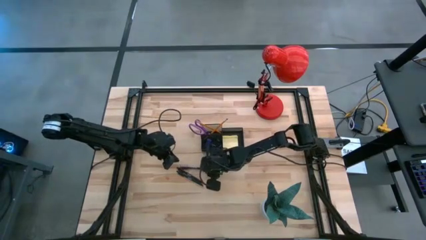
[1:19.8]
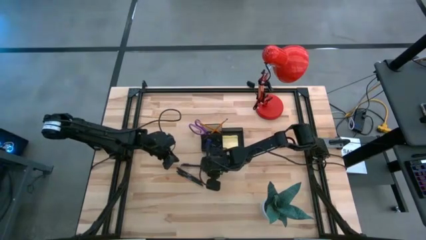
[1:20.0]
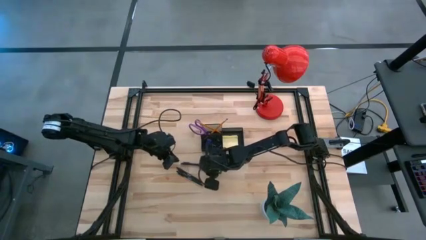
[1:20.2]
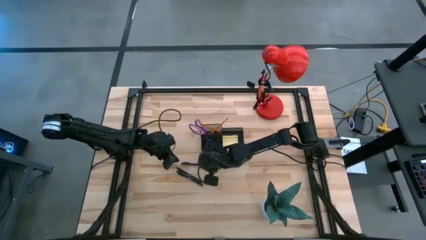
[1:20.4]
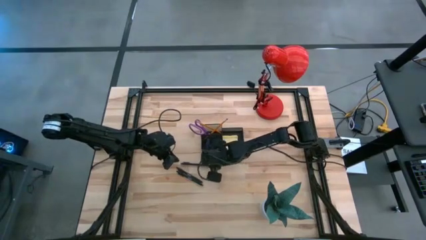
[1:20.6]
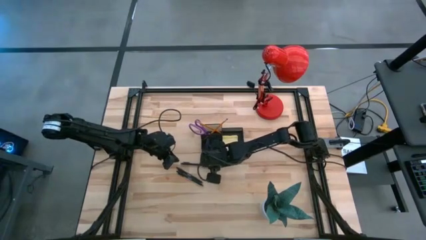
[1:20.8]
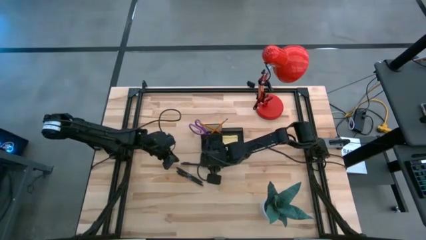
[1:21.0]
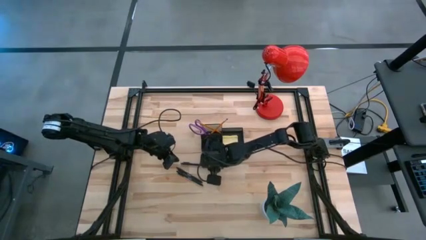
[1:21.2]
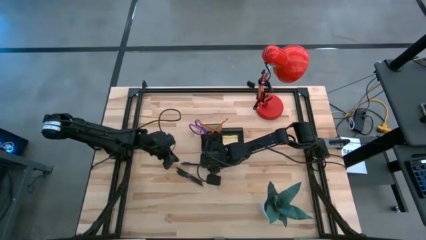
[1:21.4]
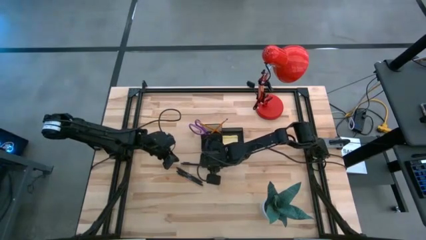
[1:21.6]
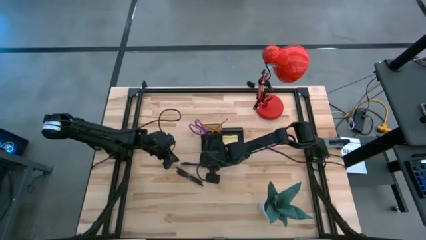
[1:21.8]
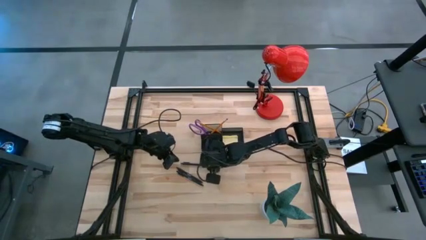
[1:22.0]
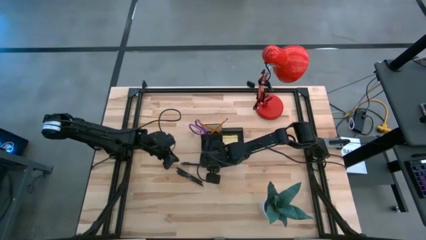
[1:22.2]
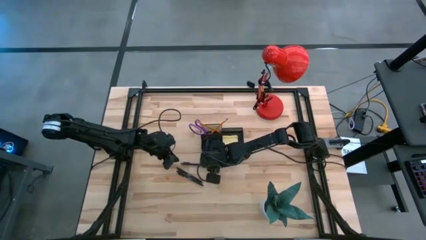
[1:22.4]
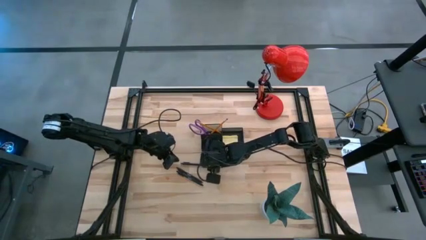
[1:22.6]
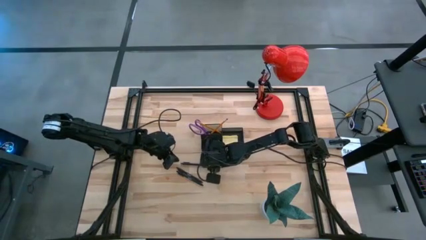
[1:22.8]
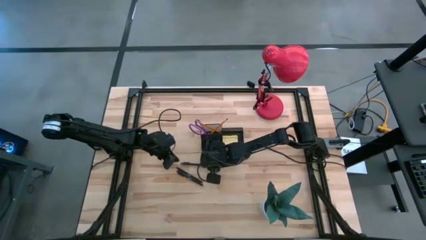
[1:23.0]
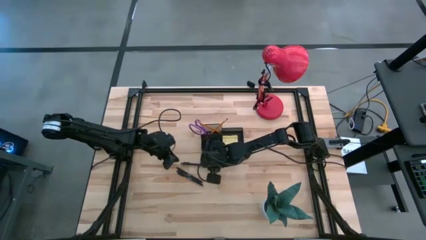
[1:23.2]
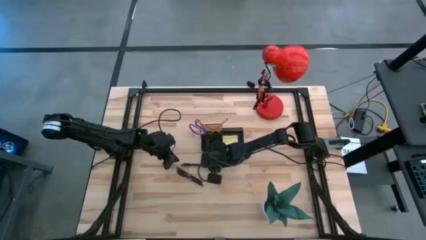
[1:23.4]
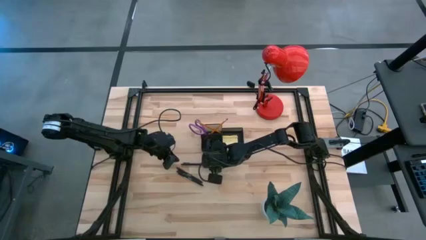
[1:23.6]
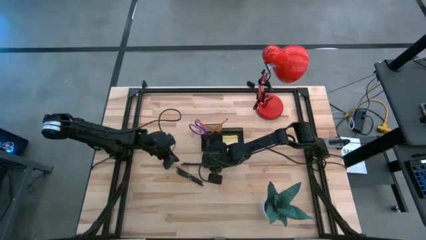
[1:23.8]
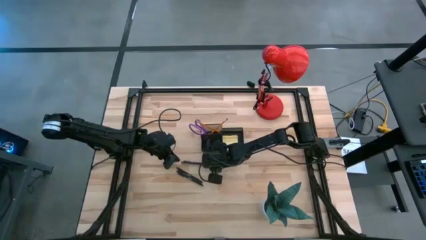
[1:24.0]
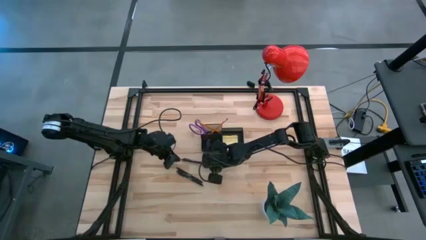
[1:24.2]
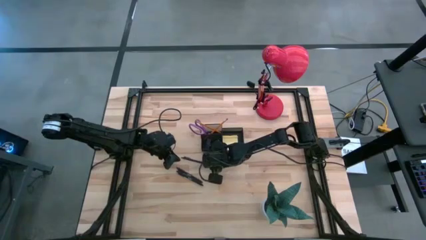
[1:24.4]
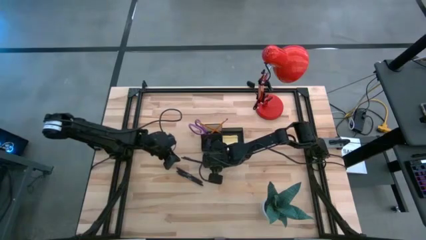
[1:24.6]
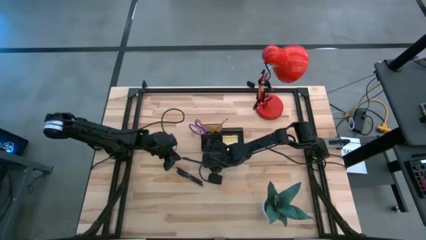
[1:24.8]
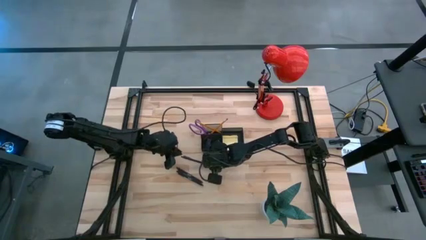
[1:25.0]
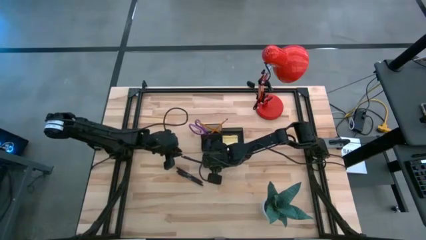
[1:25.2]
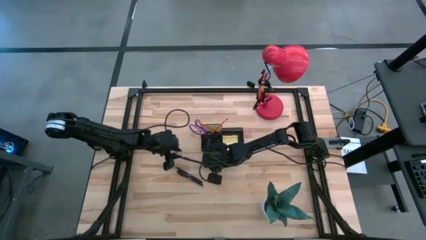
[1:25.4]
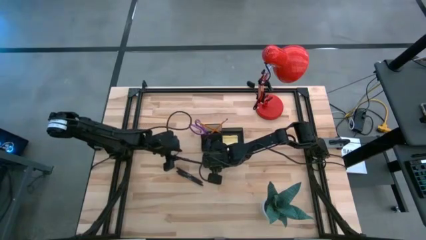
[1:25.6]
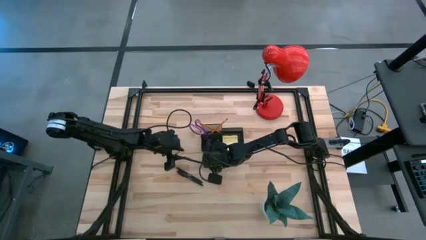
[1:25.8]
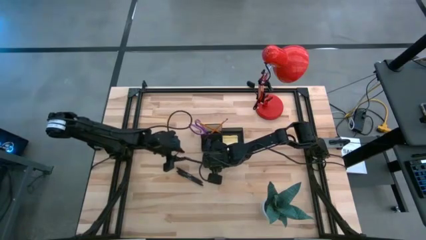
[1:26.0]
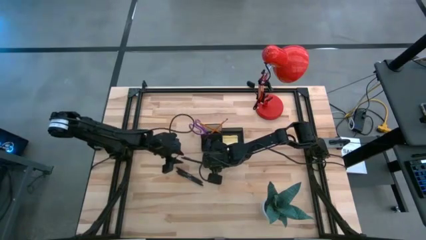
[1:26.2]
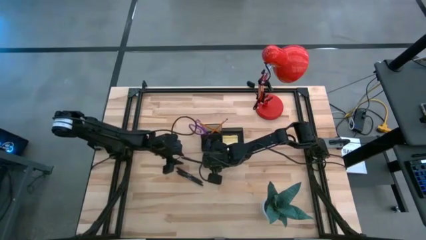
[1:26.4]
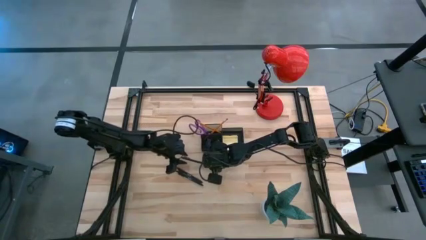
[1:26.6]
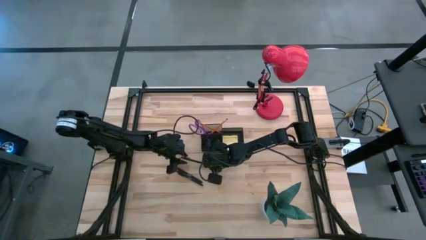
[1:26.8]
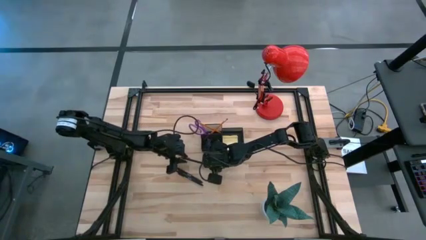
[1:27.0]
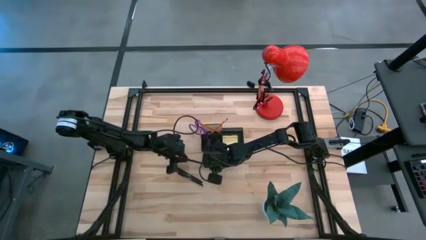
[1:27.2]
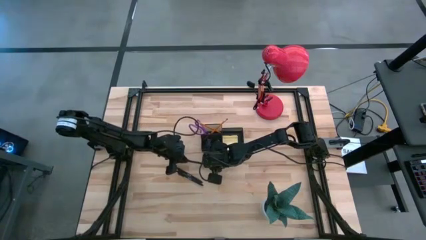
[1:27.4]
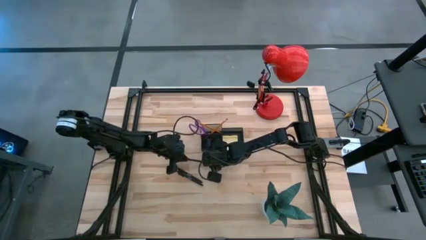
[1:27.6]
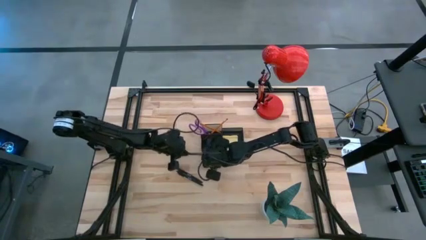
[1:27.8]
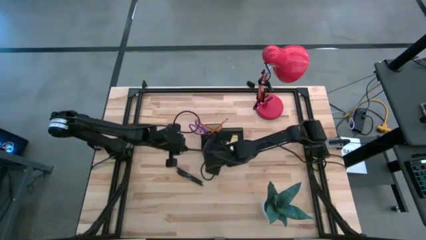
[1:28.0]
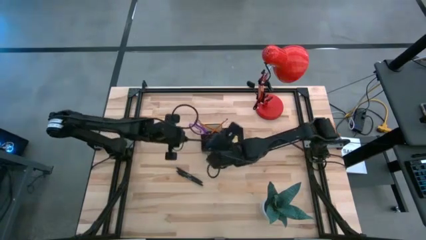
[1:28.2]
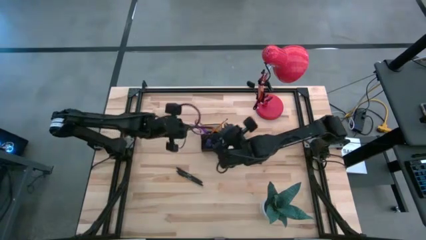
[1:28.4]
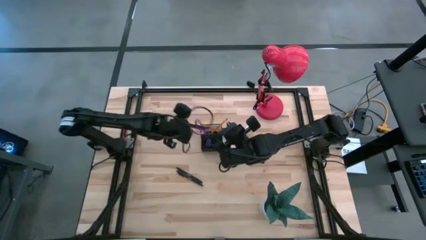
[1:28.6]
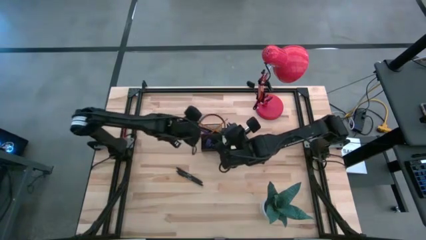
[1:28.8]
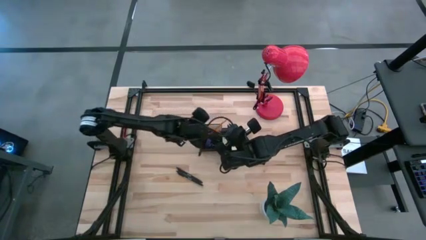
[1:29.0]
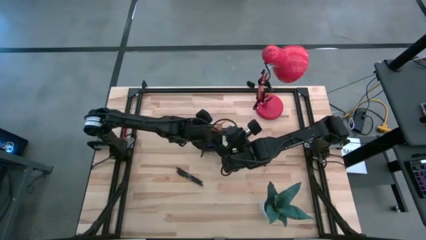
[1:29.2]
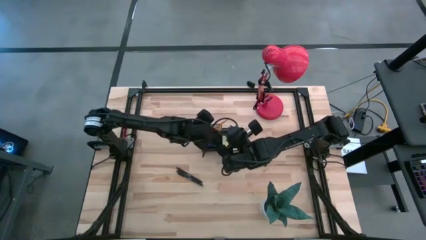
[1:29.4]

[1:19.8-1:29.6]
Task: Pick and place office supplies into organizer
Put the top black pen into the black desk organizer

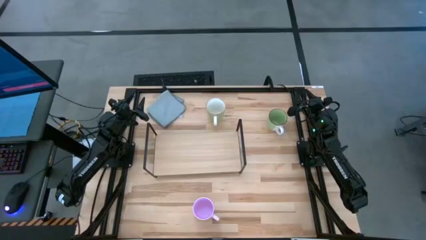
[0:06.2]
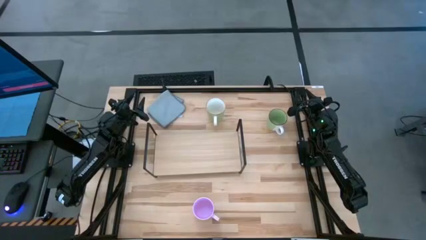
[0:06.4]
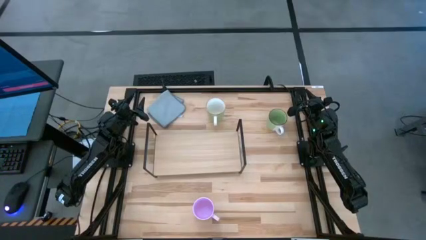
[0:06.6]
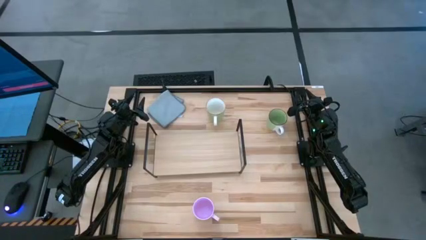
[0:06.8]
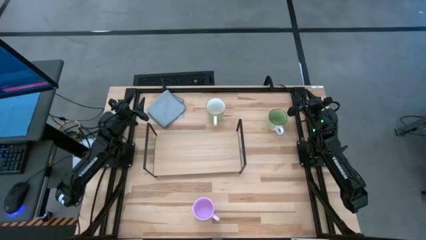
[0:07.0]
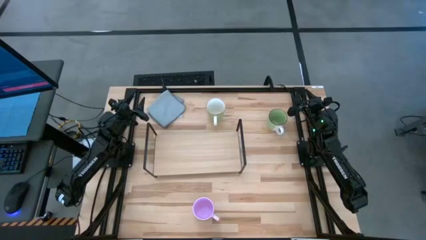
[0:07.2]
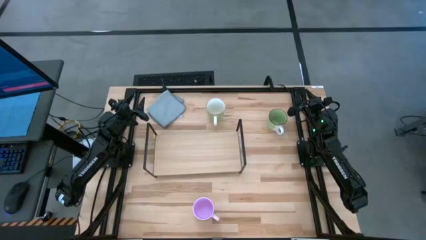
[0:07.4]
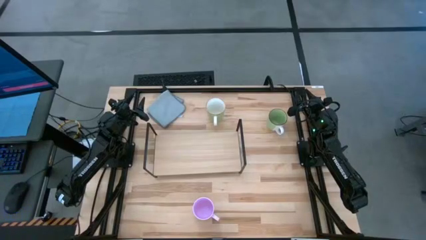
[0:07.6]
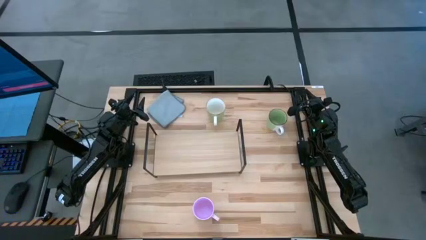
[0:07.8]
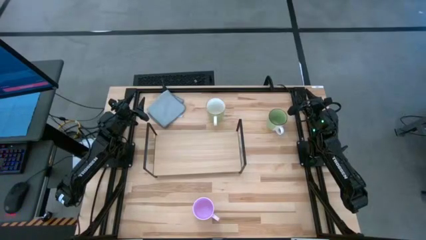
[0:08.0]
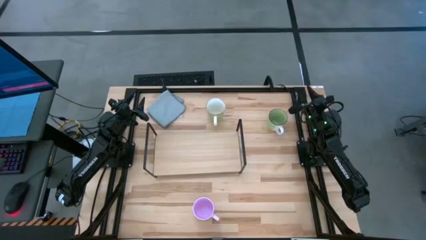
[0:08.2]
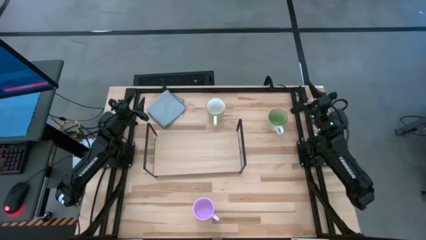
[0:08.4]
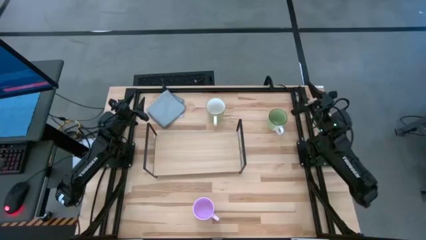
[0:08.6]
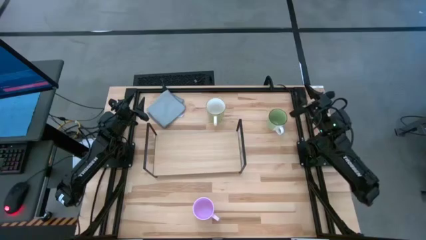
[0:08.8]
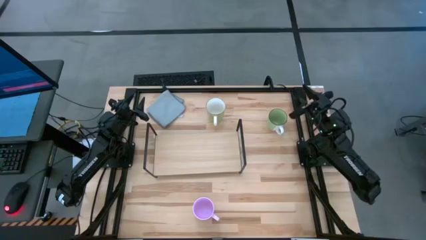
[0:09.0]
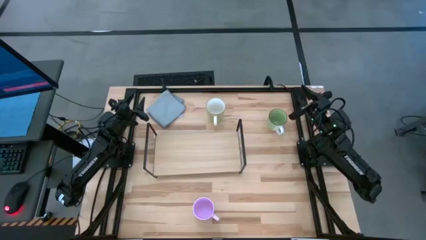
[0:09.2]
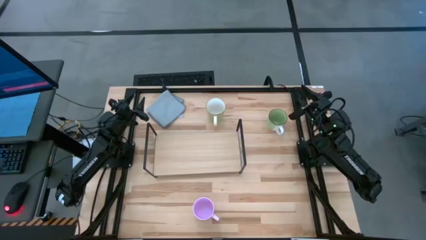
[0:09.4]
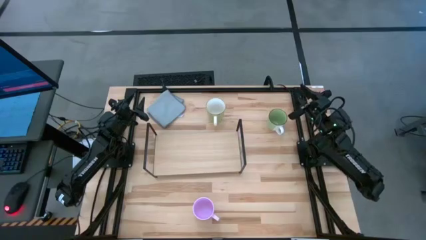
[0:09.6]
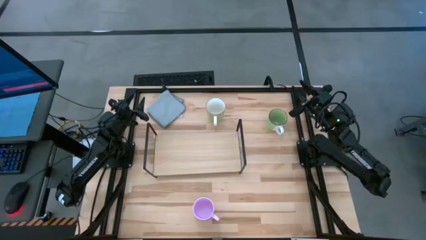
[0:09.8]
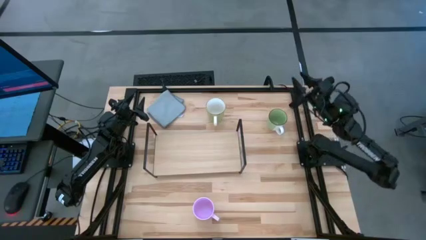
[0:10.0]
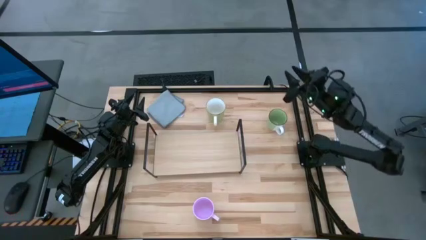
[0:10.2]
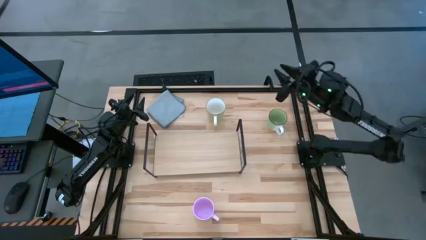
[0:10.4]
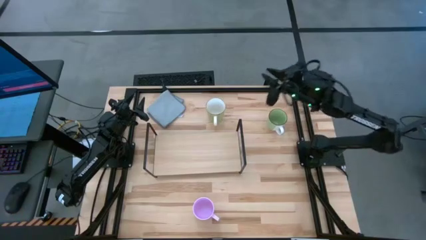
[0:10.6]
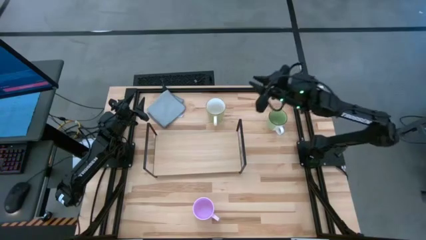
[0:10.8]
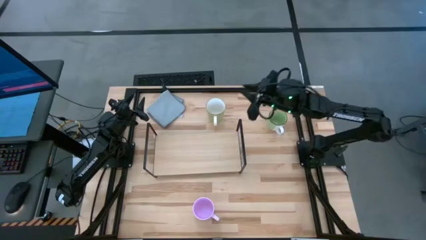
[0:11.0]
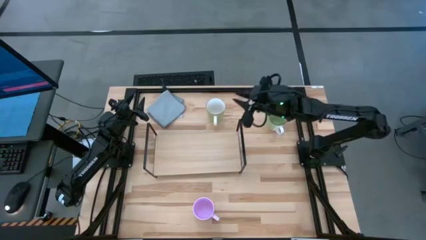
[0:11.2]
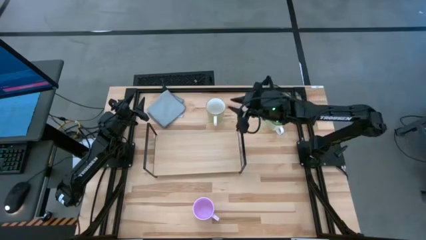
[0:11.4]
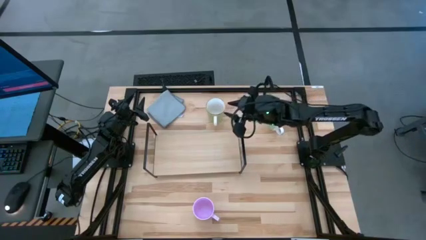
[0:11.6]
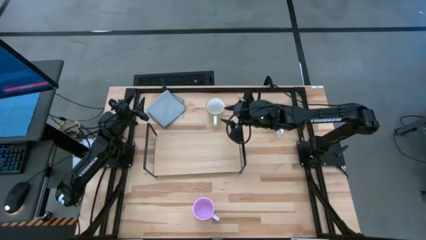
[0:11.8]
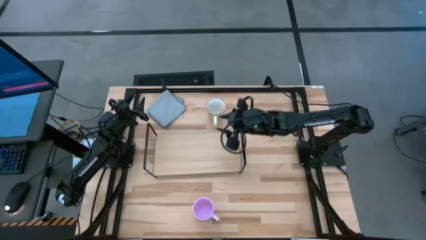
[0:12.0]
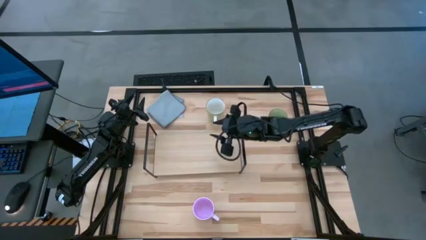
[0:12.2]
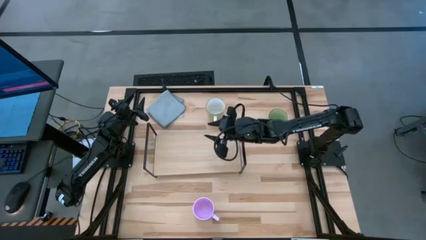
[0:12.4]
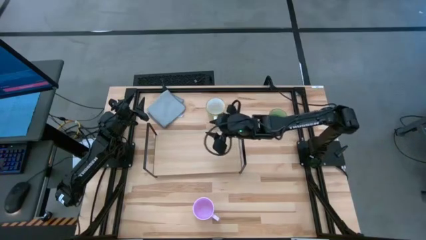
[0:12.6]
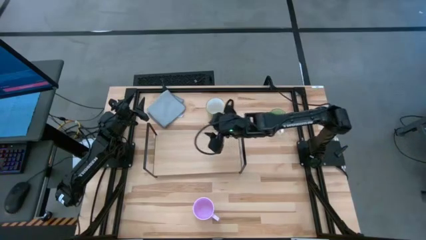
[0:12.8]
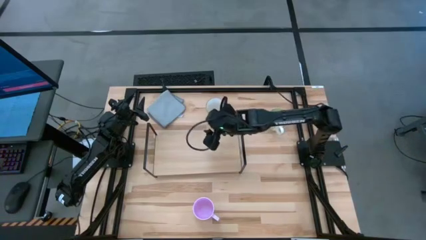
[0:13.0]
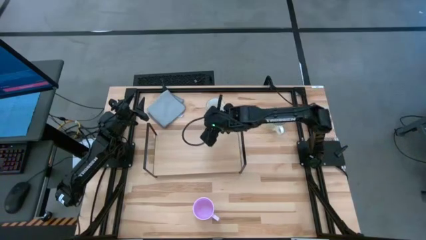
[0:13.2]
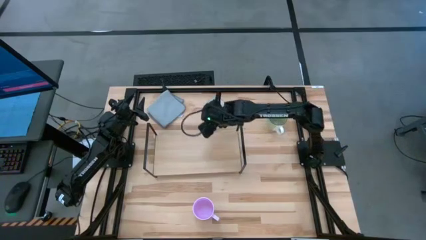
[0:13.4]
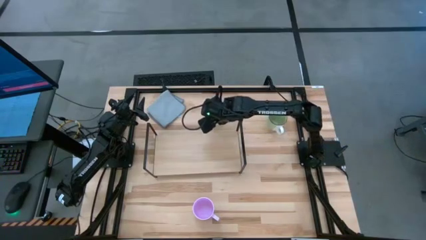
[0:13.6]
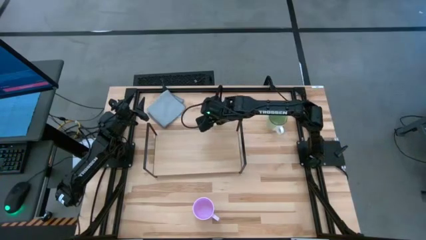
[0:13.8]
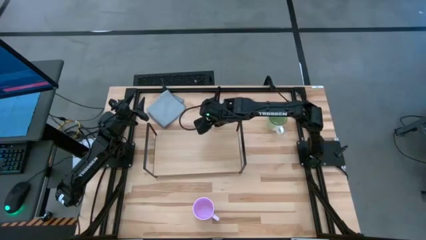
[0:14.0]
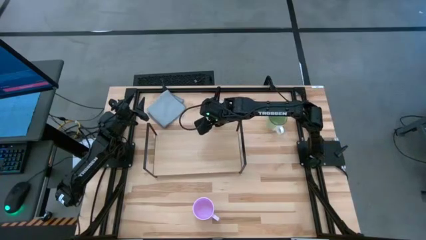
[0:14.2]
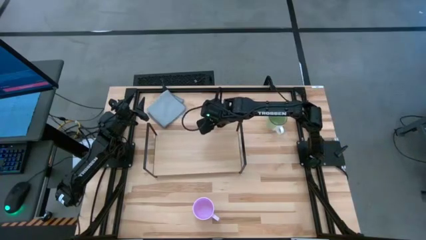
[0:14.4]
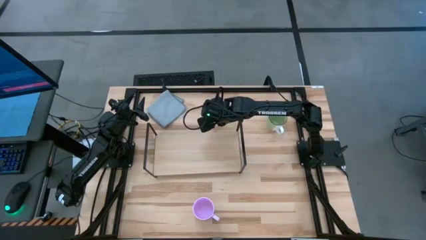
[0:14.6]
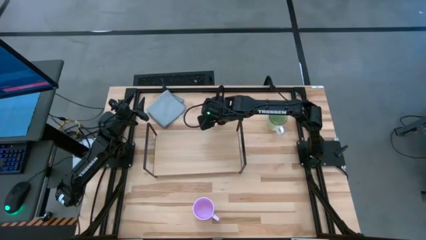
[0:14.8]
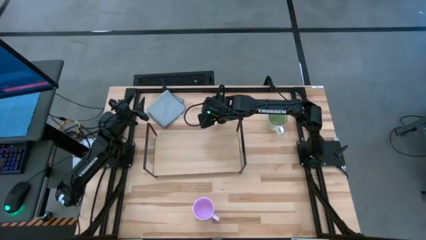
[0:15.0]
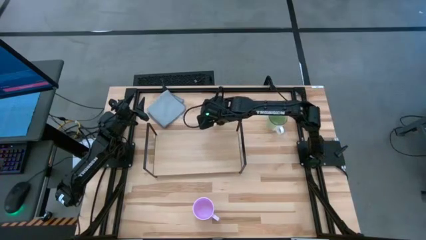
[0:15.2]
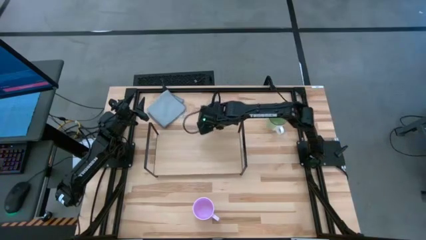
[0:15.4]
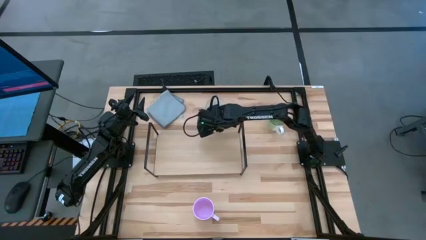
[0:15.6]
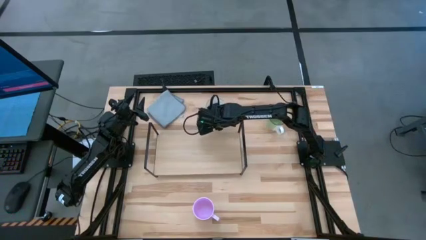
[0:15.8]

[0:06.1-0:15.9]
Task: Stack small to large cups/mugs on shelf
Put the light green mug on the shelf
